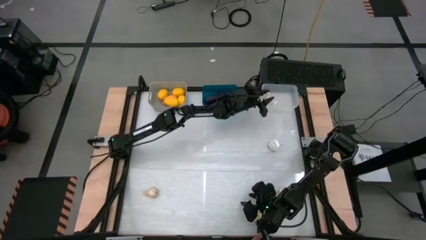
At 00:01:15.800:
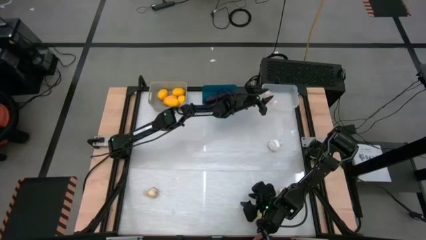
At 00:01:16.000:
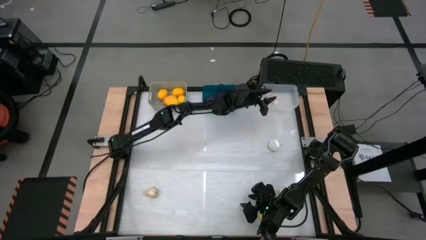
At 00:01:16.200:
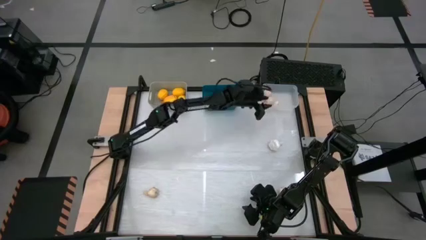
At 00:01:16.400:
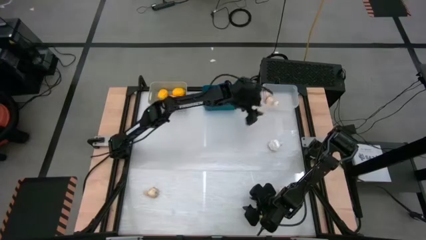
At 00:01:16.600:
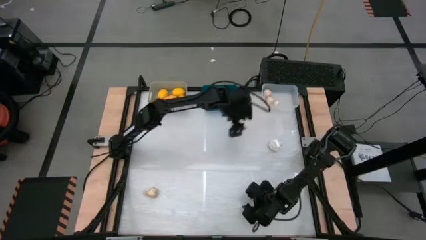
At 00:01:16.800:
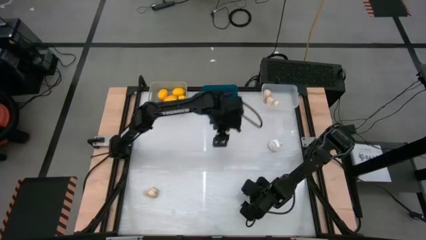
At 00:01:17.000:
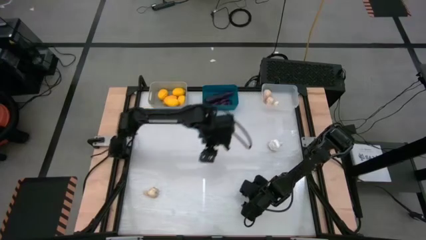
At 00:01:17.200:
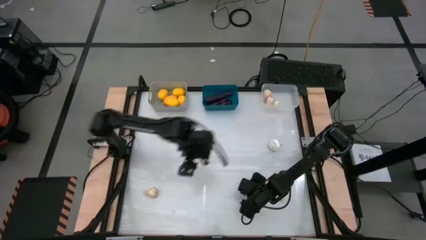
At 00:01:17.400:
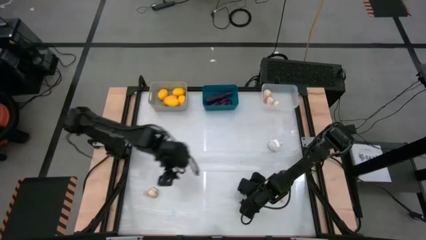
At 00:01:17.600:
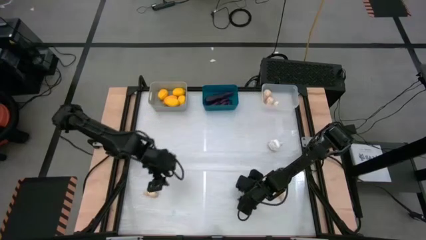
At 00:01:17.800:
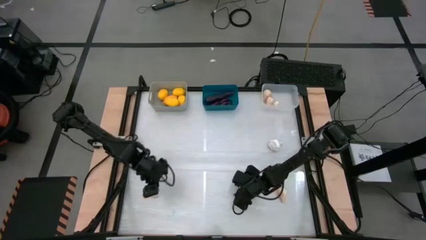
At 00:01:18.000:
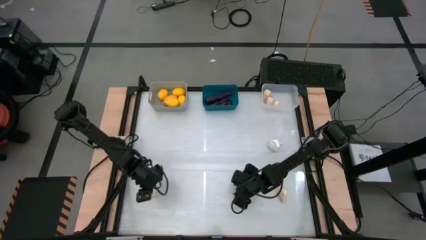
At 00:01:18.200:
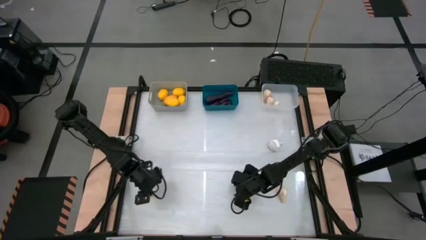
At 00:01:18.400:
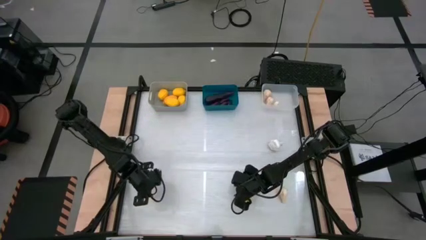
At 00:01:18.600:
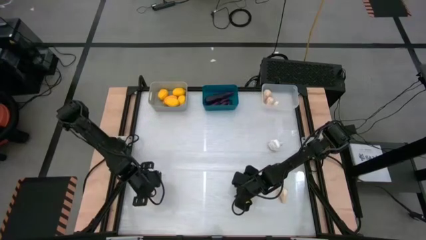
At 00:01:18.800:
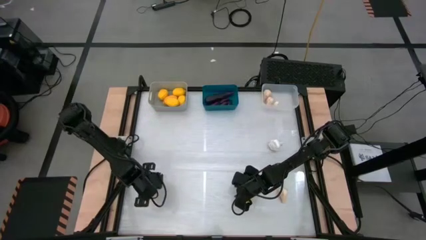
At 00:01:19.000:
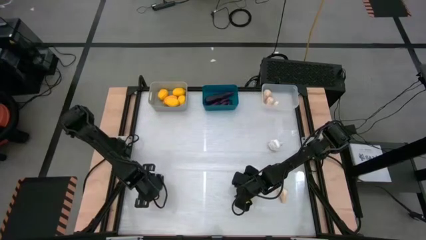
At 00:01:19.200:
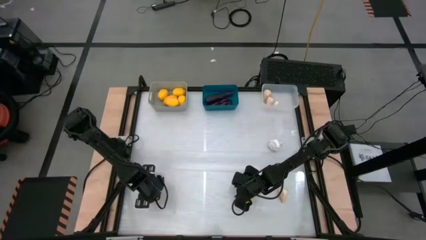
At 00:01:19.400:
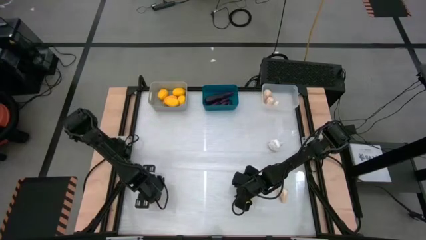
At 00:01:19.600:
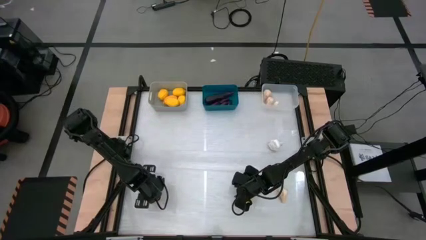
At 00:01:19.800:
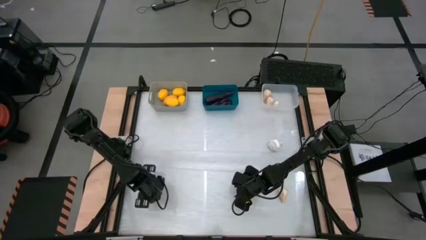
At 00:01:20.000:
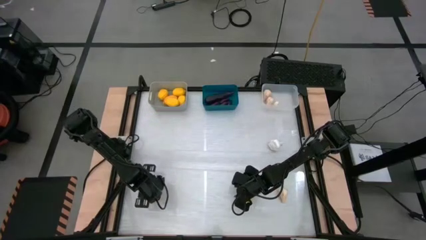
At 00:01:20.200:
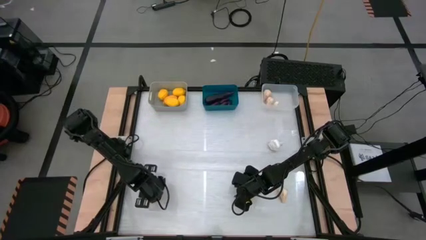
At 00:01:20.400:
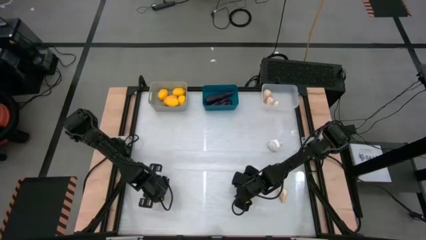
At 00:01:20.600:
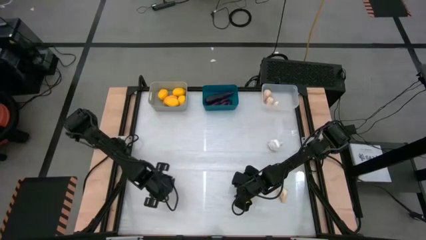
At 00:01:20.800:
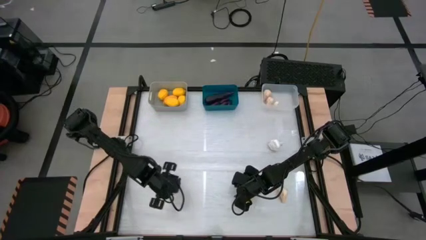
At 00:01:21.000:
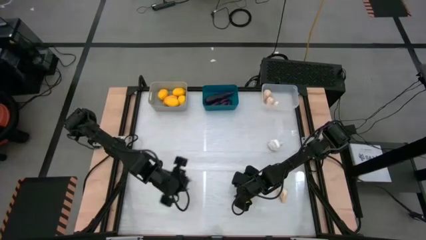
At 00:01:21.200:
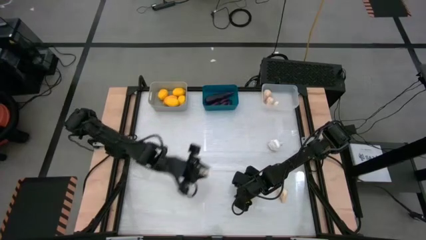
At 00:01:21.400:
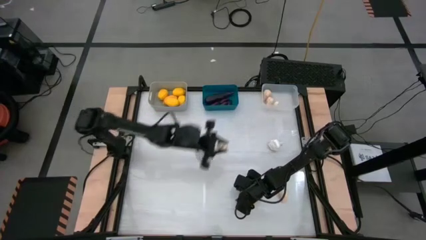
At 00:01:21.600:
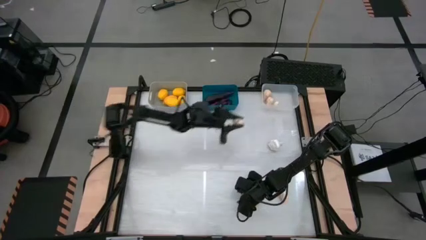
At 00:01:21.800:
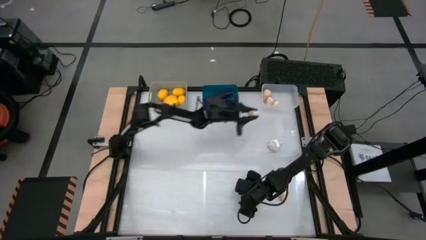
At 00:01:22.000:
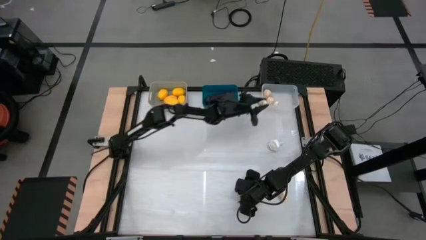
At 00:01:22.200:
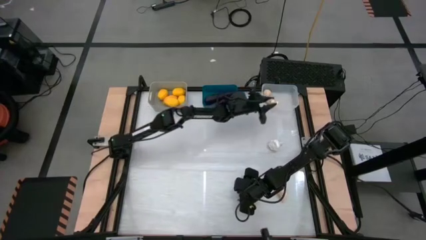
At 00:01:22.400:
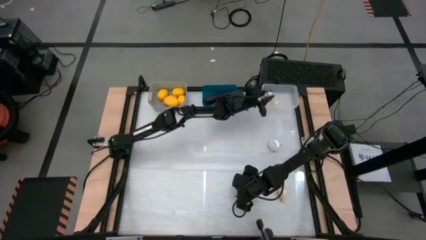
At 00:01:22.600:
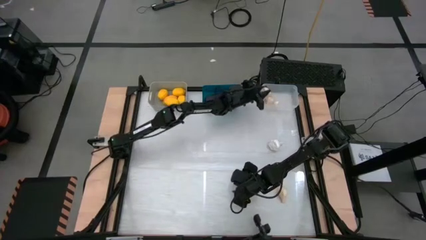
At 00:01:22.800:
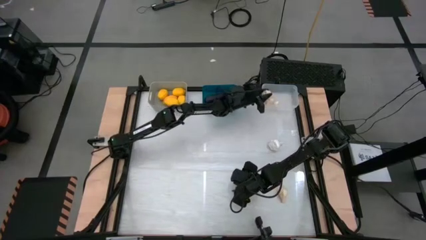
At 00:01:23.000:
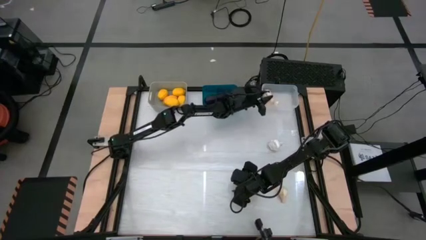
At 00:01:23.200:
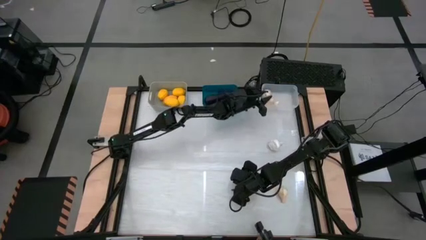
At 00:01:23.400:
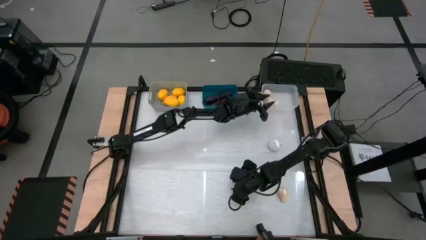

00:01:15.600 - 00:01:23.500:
Task: Sort produce into baskets
Put the bottom left garlic into the transparent bin

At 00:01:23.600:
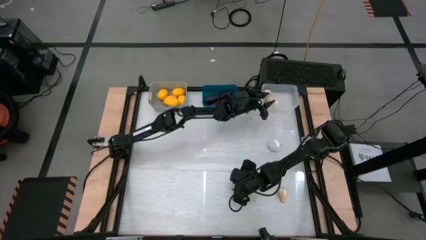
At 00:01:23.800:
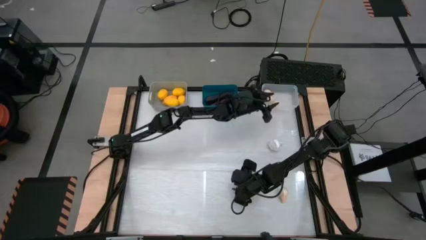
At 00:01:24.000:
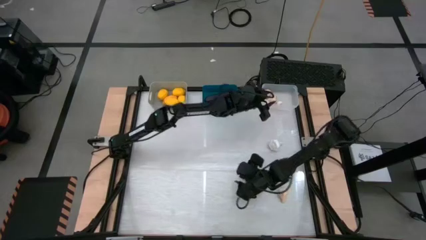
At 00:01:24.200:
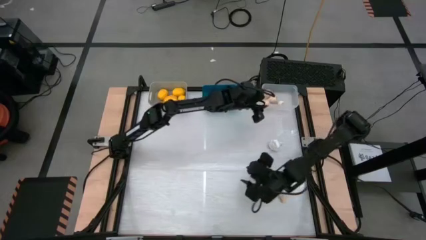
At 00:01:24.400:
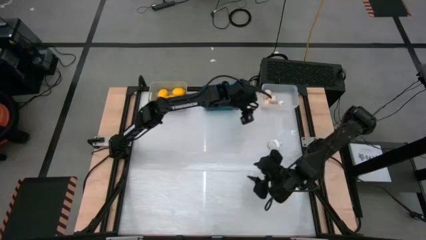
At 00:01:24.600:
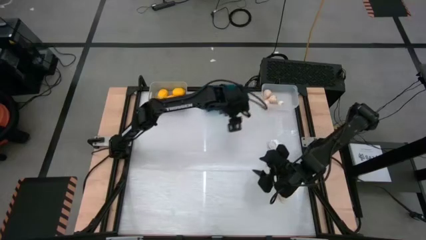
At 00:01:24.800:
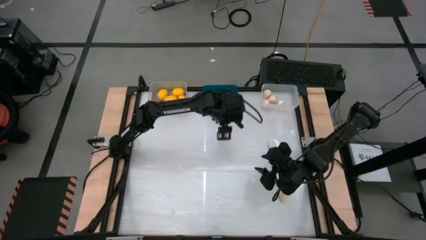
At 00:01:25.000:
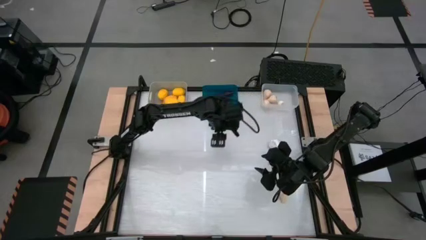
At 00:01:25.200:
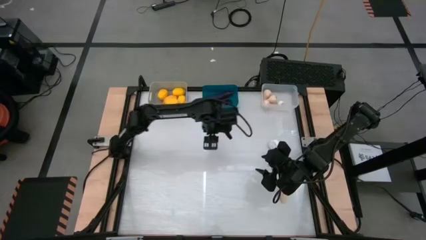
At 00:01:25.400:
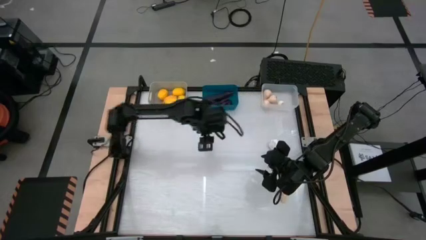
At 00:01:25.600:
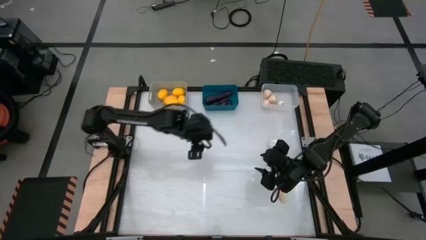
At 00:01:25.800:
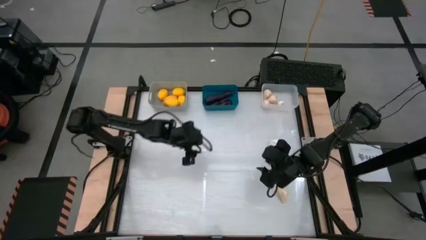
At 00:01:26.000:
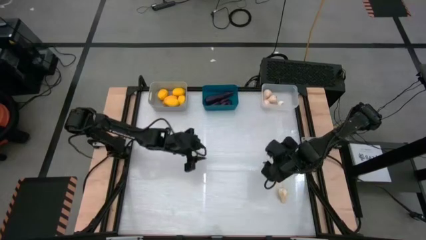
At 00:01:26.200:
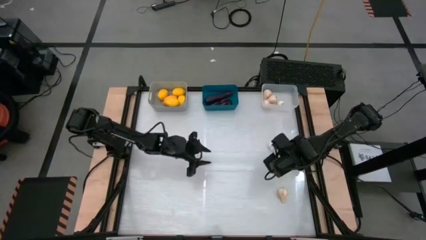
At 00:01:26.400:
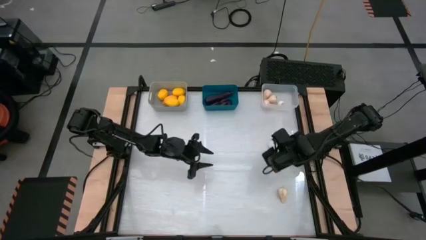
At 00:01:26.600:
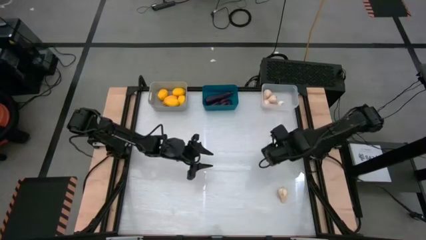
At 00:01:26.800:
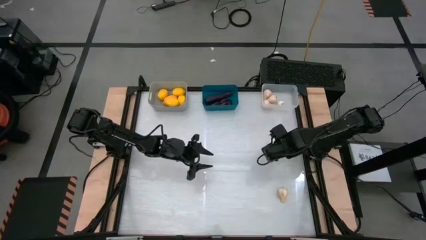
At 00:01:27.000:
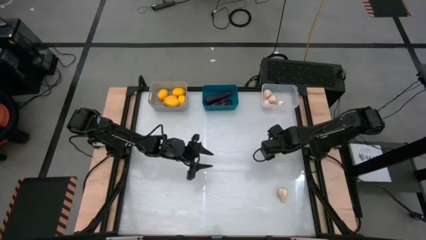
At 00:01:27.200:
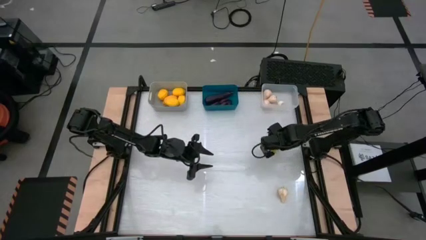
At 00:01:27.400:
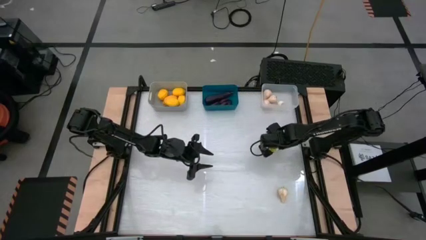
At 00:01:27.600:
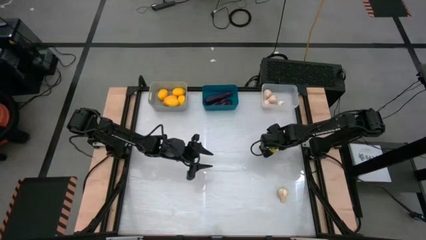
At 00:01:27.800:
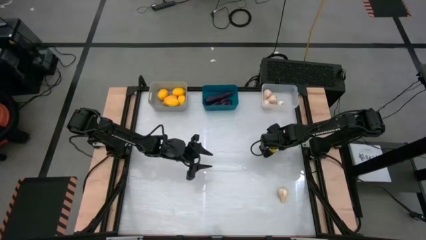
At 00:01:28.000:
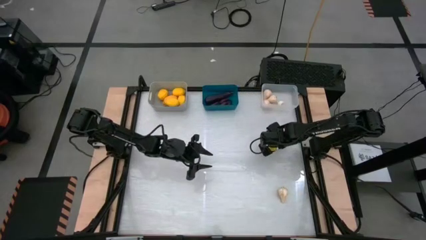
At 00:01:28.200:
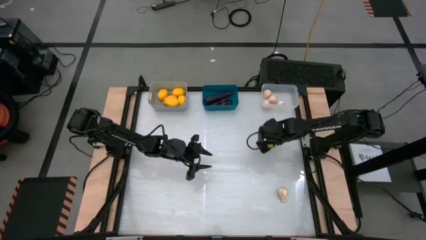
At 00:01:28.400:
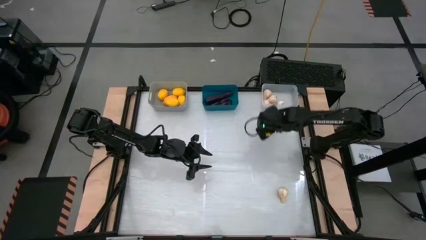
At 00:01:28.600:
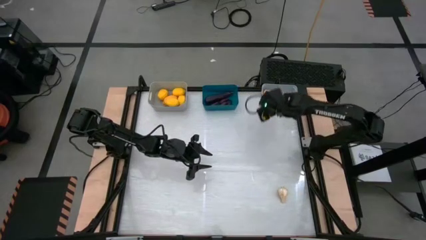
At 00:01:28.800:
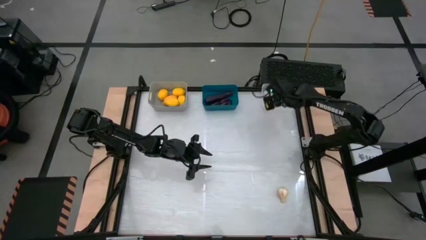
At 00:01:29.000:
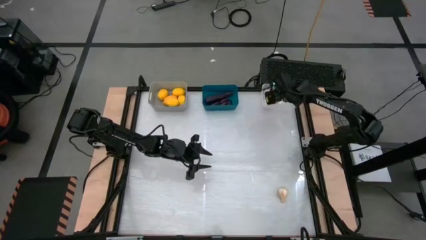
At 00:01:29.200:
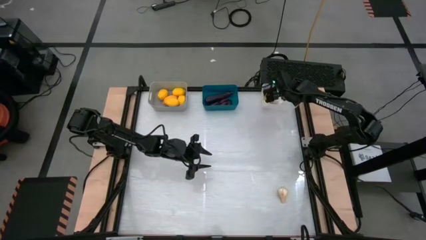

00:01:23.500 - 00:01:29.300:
Put the top garlic into the transparent bin

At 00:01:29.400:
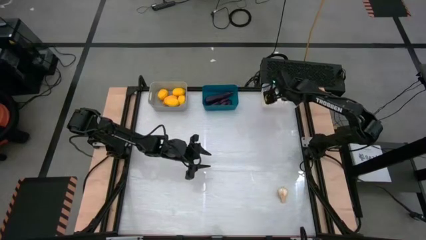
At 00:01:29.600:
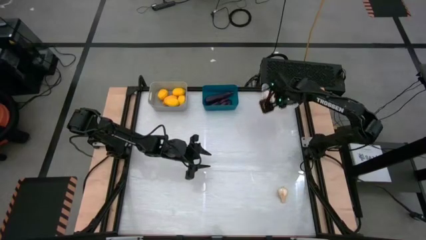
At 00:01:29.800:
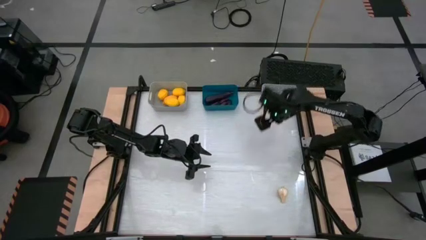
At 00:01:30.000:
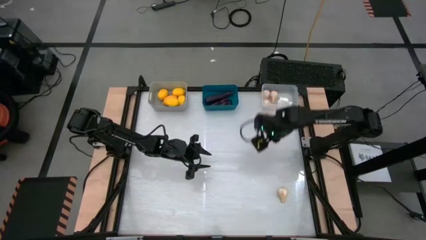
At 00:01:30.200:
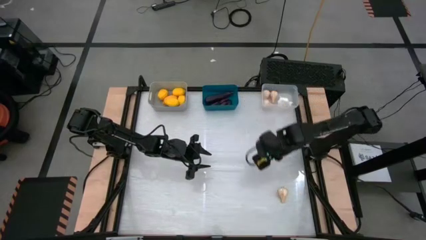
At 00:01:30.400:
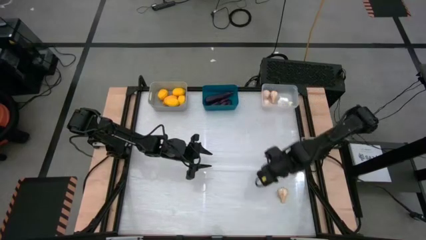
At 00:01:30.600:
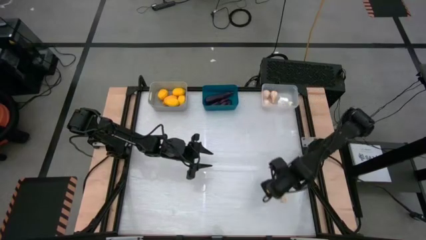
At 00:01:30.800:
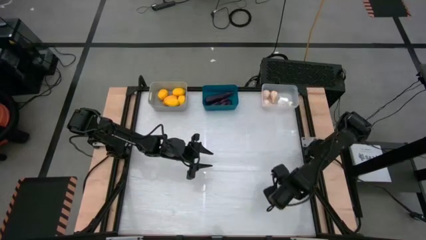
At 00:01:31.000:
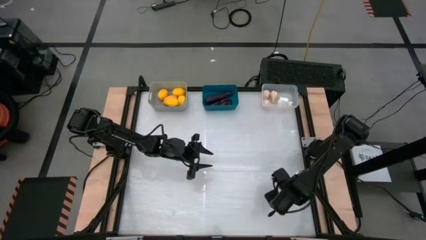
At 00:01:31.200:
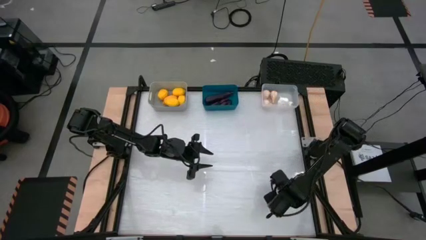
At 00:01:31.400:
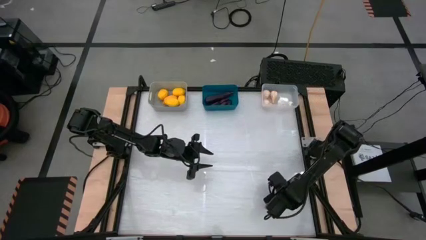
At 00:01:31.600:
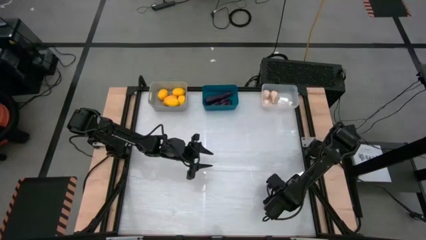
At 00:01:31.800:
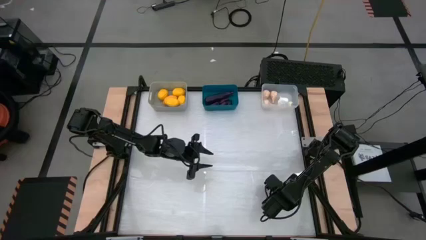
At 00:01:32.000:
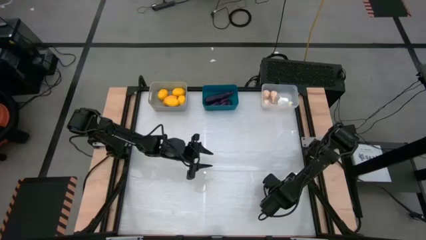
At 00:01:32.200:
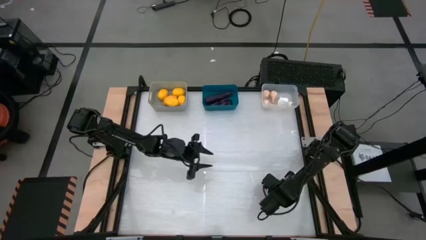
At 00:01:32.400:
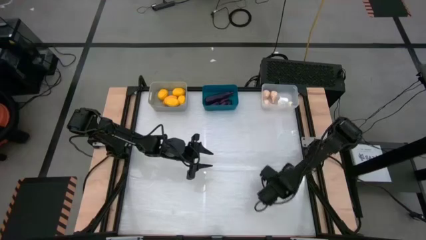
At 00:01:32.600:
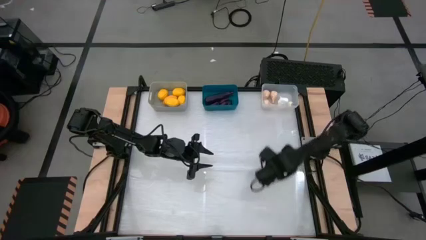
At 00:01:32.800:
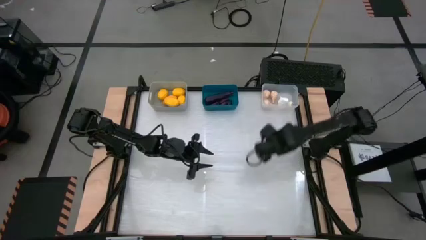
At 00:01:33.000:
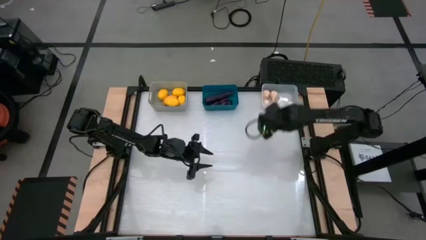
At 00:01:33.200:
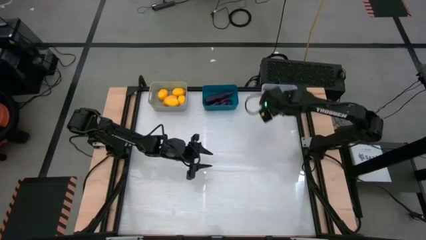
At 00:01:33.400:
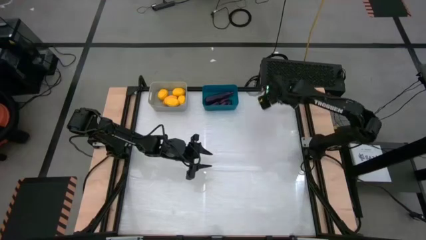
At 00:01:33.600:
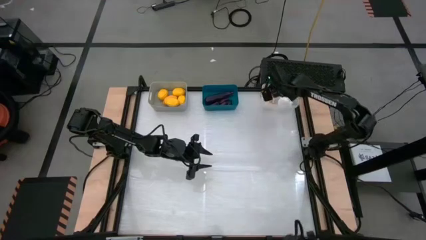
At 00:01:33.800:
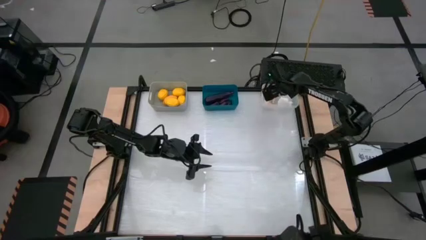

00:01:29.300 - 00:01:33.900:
Put the garlic into the transparent bin
